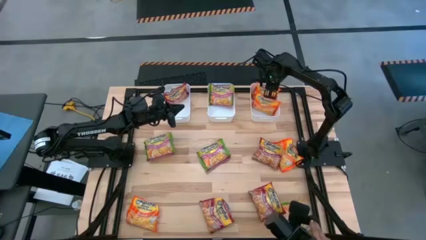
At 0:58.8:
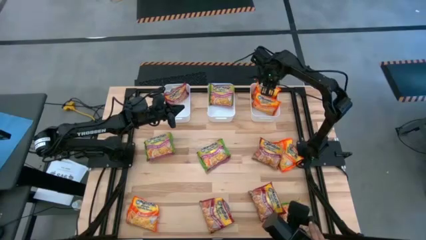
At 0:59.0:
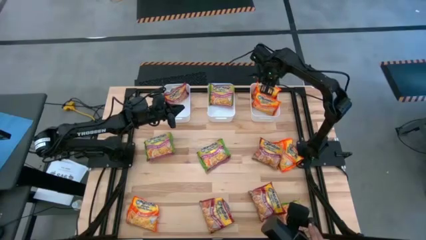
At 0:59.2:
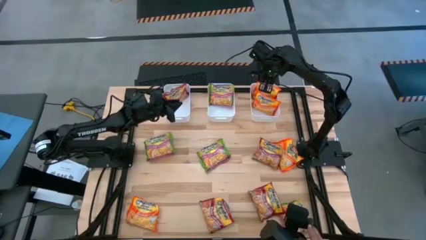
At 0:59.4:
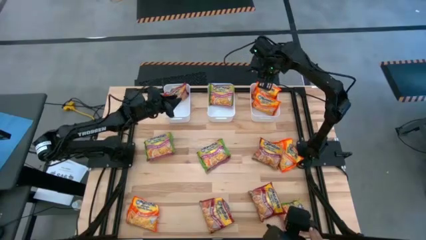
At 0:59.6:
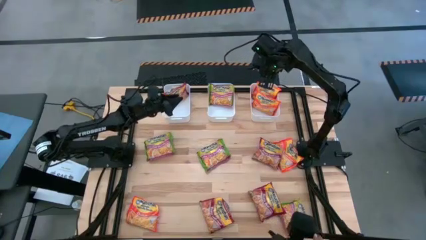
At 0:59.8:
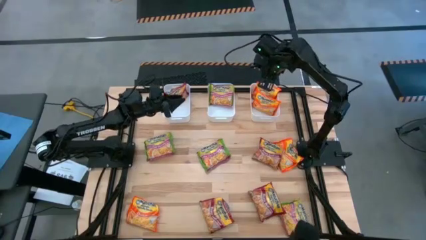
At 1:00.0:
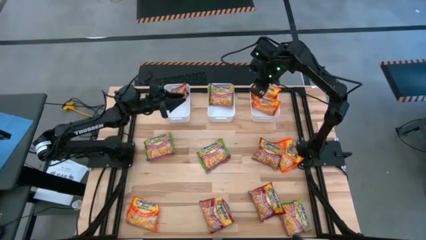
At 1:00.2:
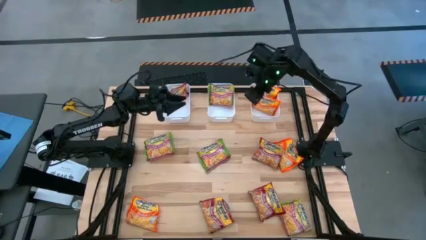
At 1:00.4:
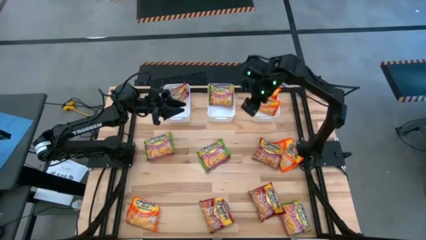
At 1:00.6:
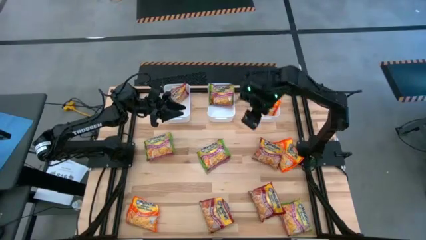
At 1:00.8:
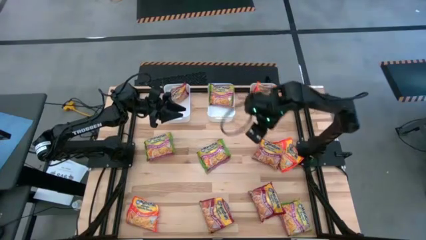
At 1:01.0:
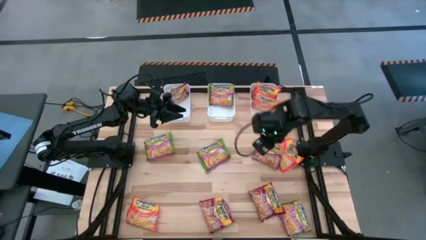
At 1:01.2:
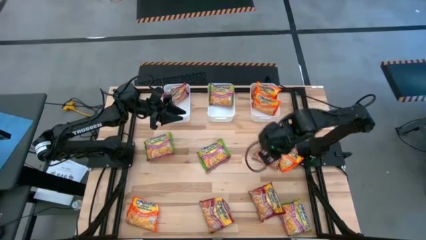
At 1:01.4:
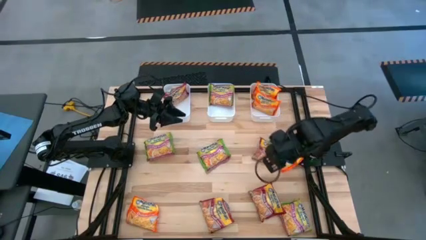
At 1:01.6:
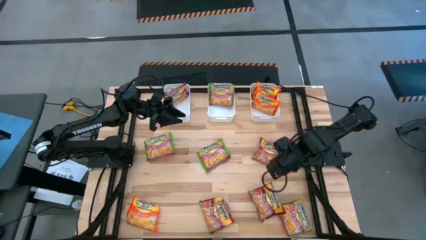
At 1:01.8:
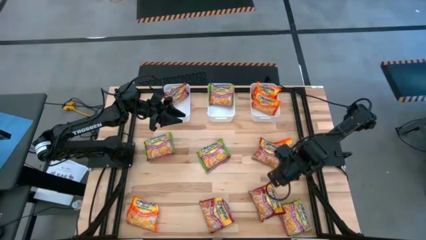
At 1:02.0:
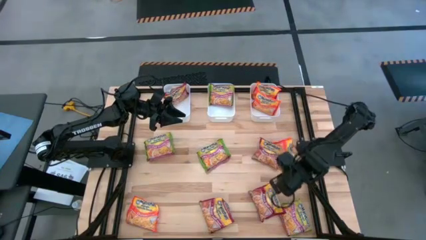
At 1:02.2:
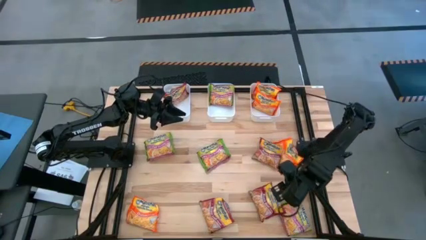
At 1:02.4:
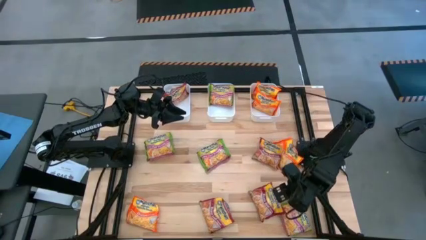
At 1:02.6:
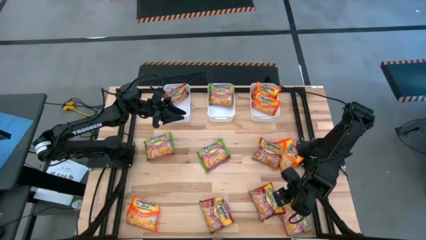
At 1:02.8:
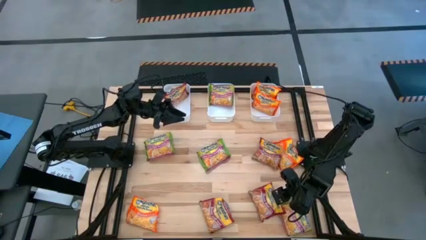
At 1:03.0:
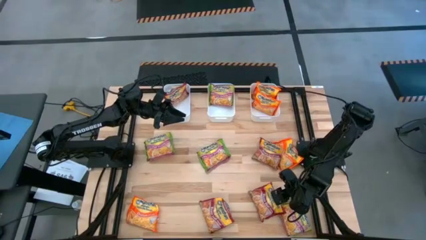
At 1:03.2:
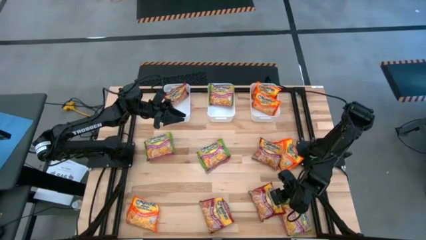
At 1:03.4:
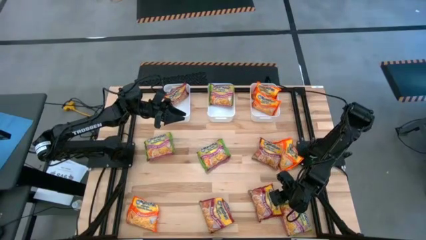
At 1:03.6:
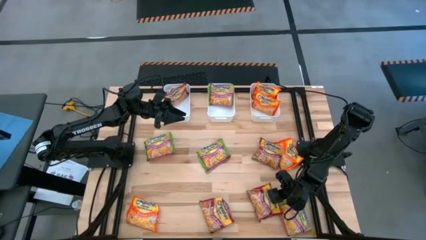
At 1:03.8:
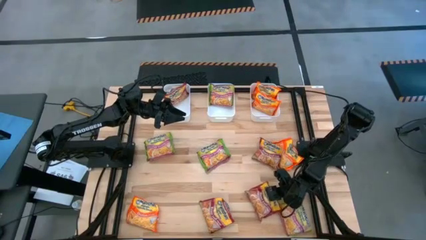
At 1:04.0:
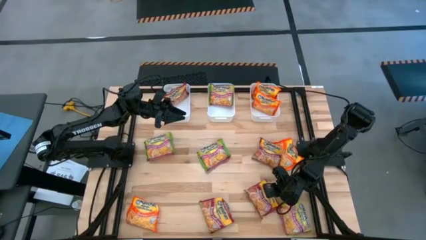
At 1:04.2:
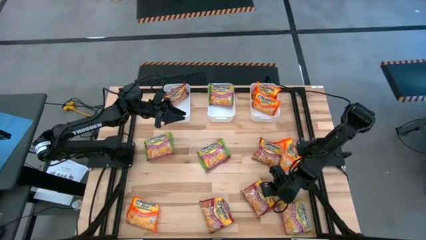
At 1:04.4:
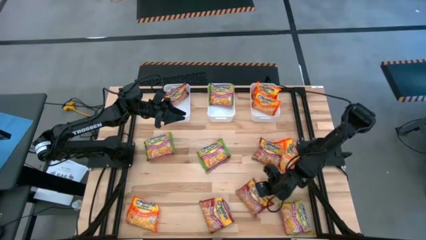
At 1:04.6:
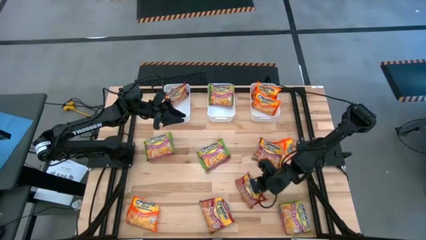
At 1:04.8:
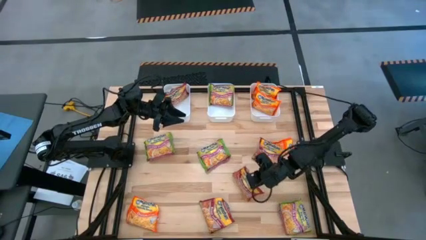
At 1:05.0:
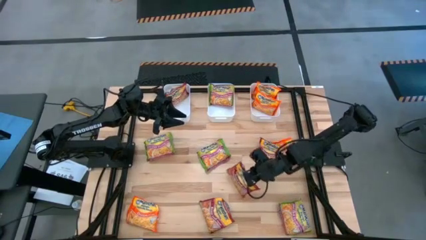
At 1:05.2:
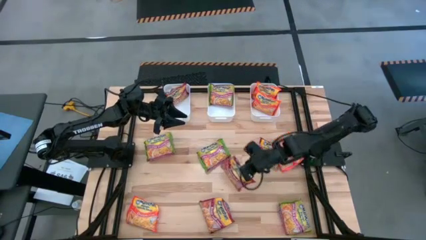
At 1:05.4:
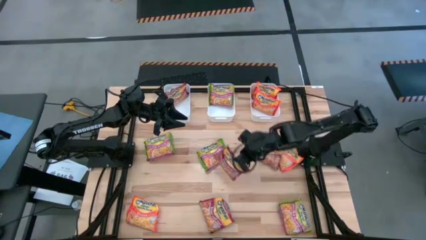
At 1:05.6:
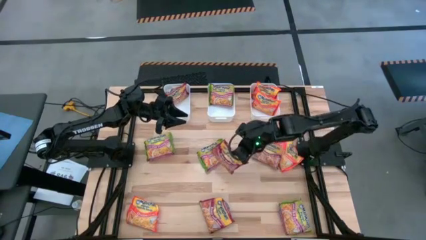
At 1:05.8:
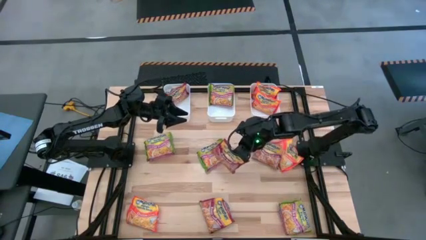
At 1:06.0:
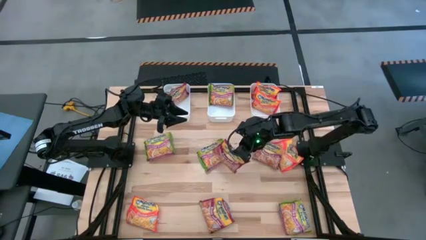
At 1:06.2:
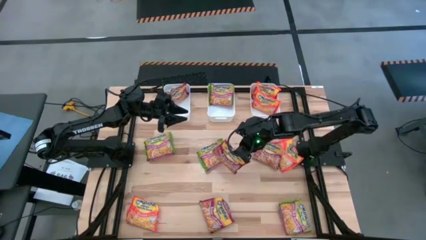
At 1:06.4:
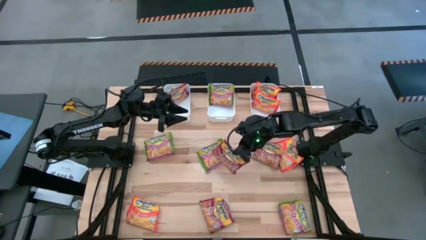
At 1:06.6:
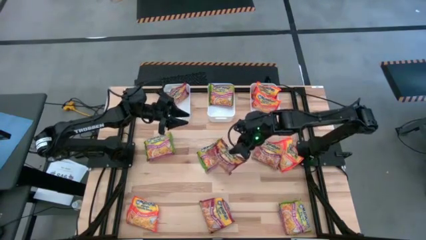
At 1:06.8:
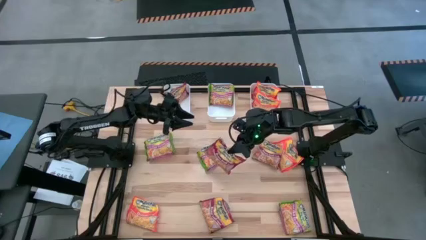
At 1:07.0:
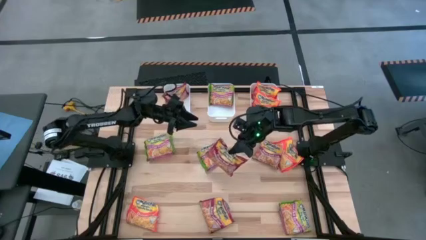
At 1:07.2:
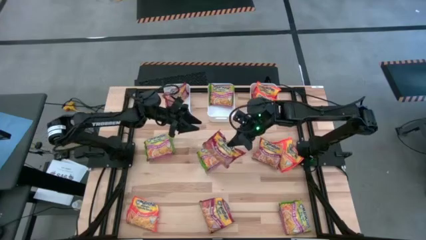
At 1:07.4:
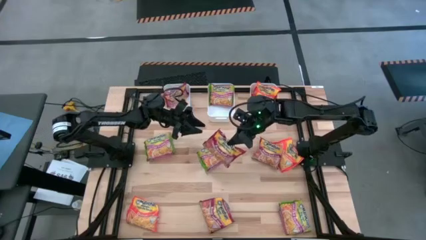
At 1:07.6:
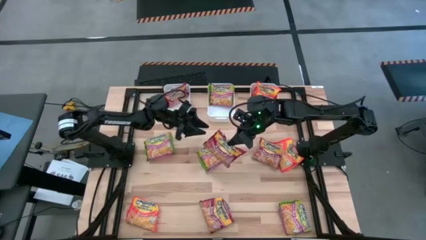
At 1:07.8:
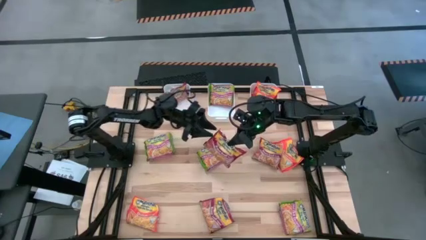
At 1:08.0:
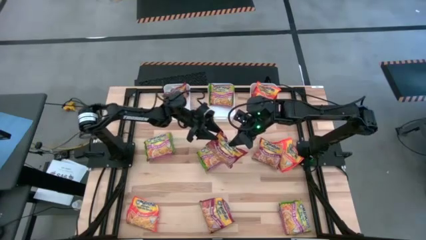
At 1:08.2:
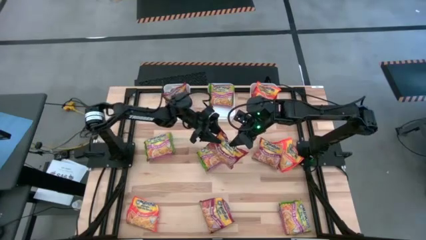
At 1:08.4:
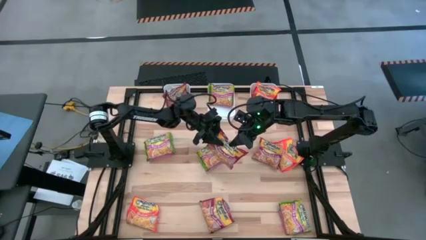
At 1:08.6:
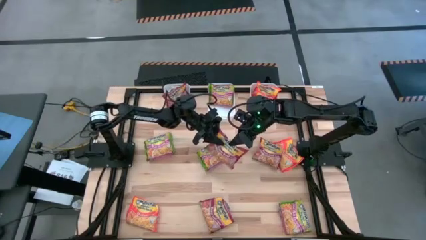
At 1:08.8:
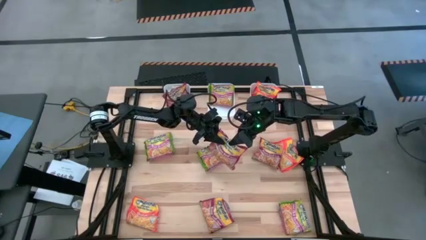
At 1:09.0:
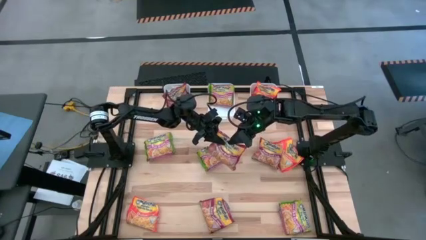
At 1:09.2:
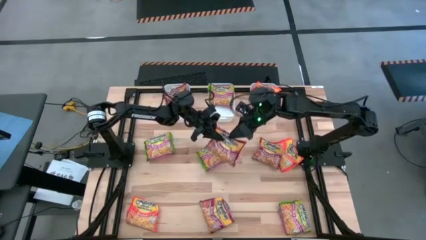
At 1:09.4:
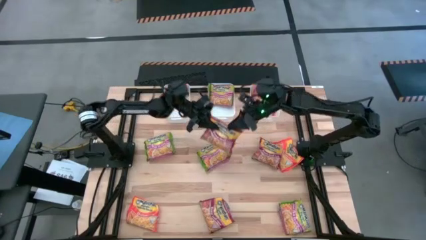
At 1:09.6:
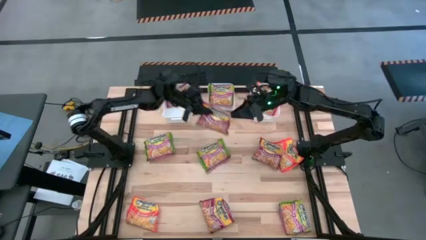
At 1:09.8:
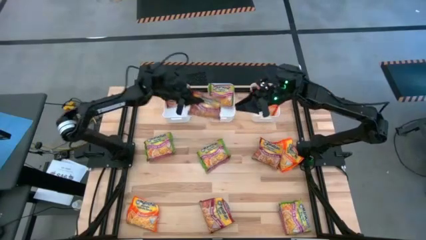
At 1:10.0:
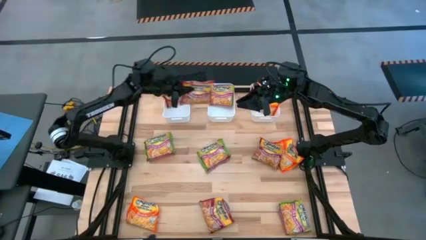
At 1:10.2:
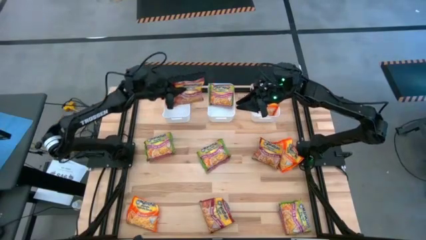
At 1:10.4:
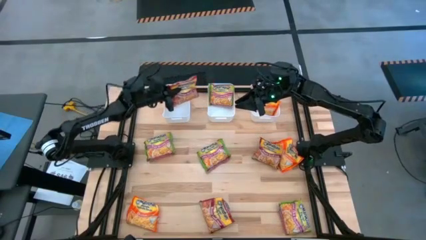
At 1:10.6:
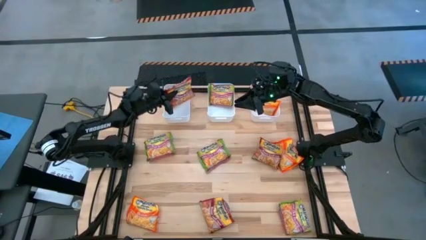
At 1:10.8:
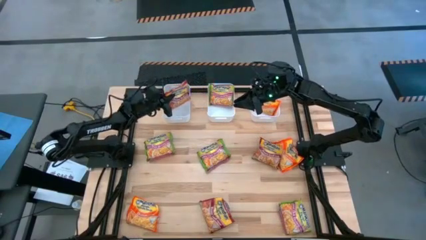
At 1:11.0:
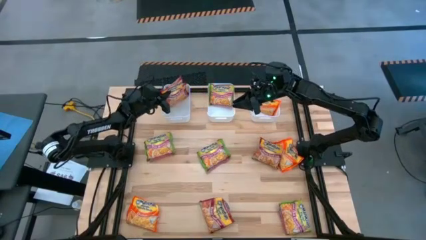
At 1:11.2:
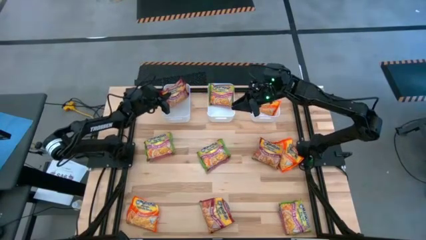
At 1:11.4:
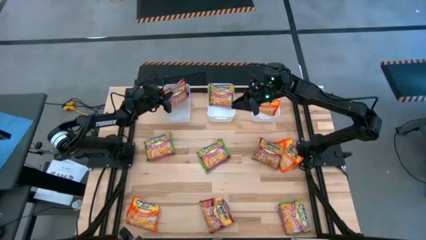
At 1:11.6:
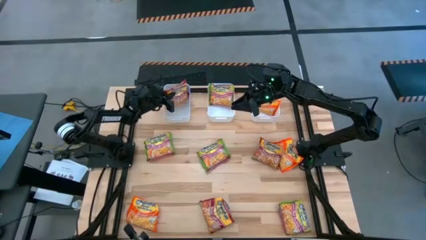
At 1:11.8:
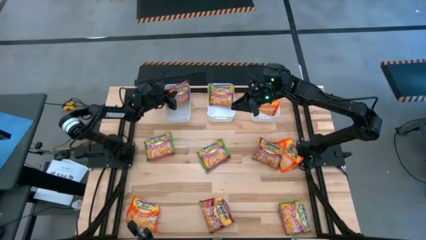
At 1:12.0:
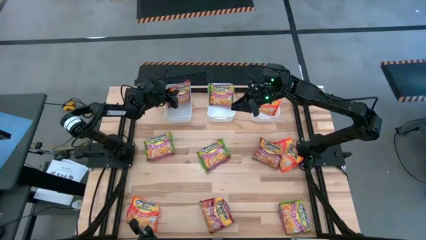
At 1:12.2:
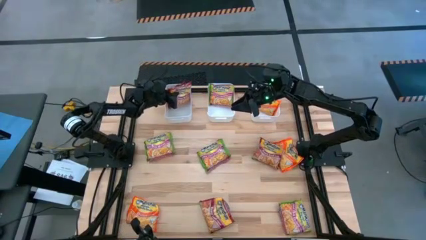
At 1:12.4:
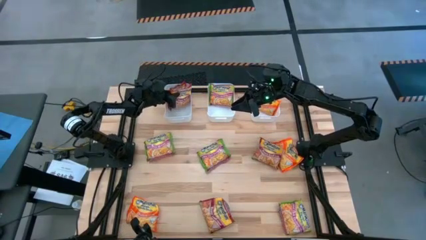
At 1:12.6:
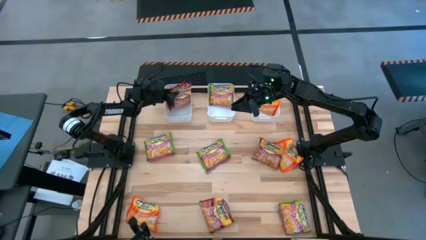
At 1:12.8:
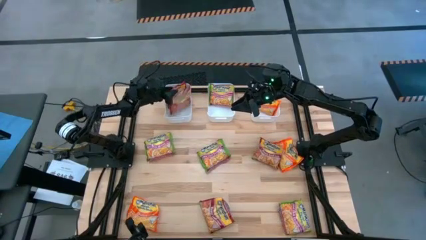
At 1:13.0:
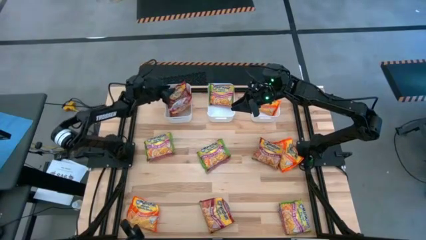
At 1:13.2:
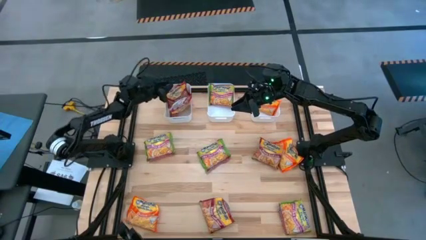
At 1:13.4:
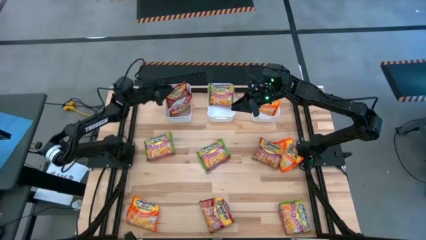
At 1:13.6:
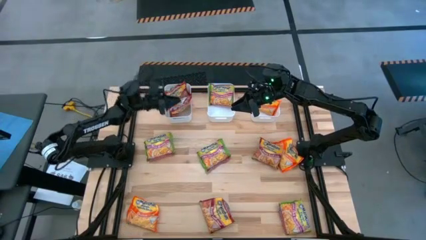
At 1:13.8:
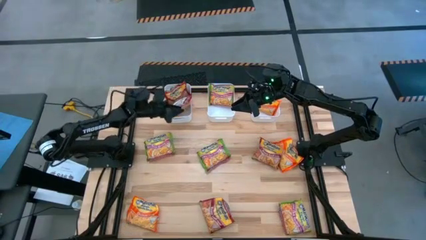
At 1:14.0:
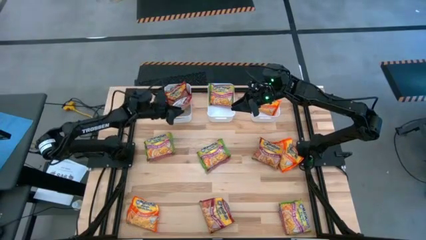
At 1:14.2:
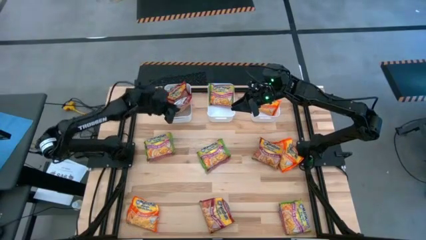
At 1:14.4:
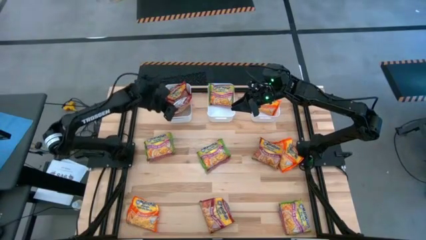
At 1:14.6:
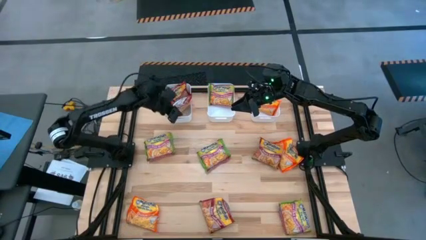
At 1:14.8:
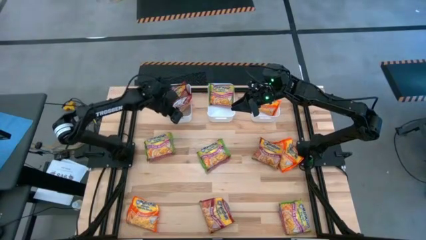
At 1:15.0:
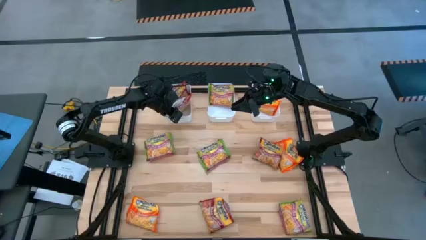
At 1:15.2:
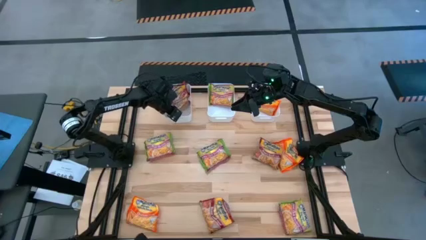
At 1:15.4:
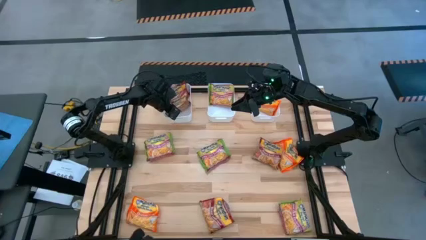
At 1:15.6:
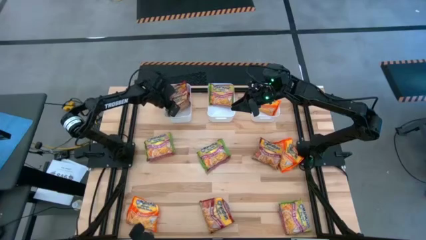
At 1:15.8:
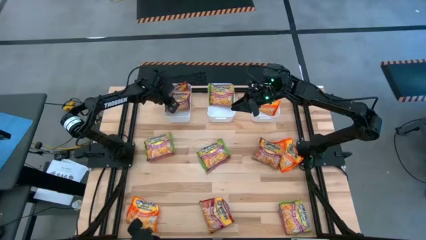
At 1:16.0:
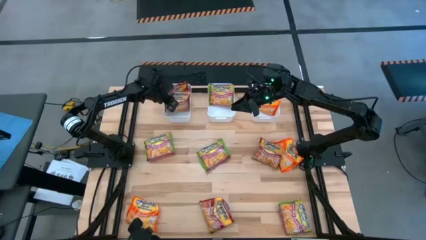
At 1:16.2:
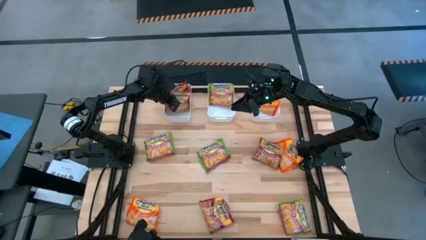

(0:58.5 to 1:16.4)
Task: Sort Maruchan noodles
Put the red noodle pack into the left white bin
